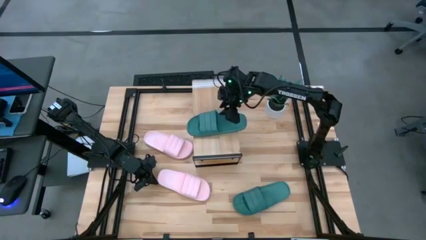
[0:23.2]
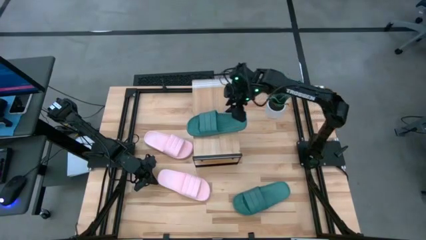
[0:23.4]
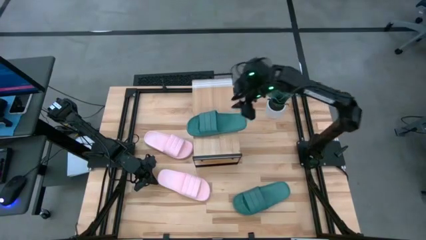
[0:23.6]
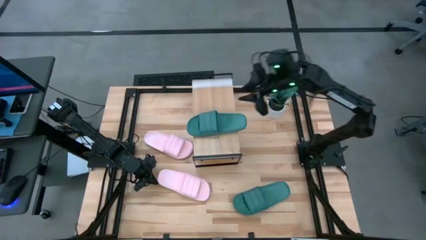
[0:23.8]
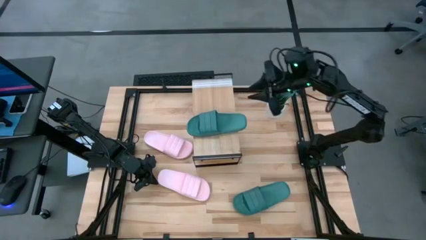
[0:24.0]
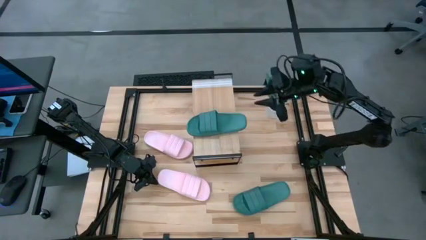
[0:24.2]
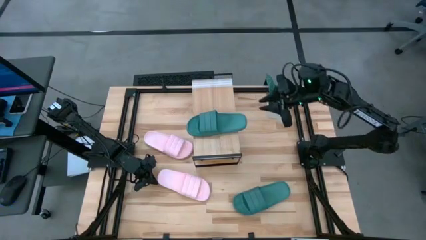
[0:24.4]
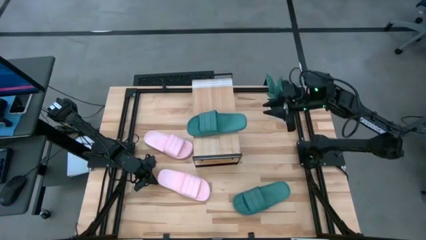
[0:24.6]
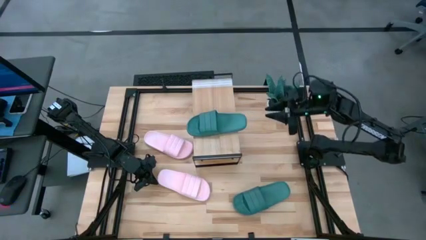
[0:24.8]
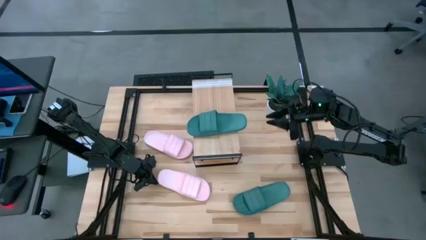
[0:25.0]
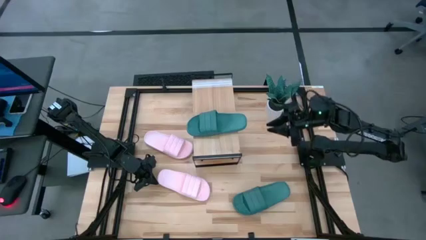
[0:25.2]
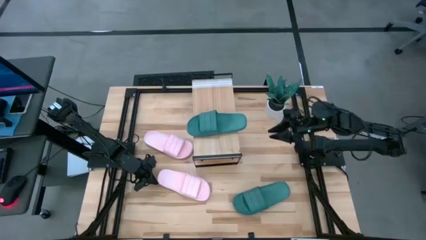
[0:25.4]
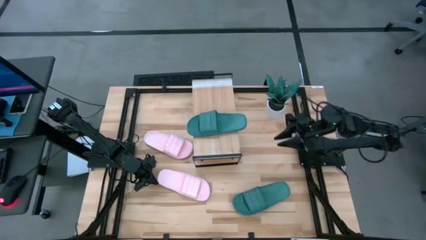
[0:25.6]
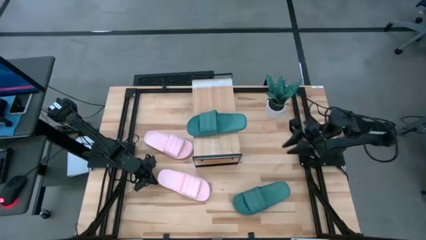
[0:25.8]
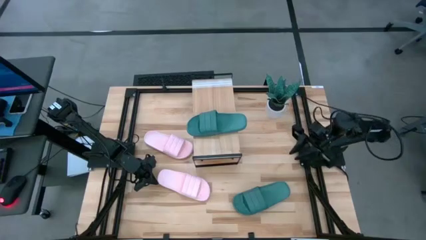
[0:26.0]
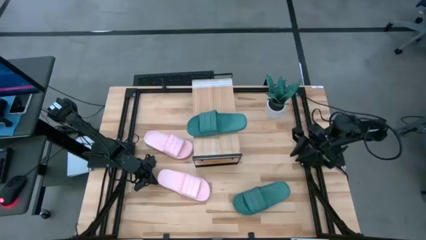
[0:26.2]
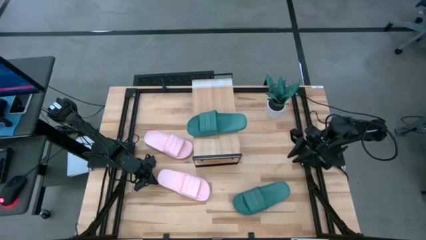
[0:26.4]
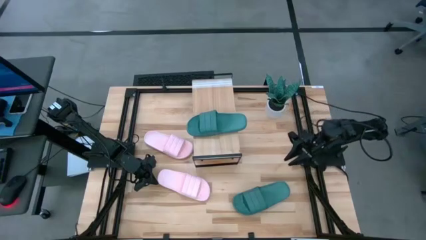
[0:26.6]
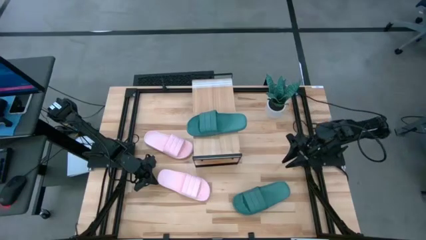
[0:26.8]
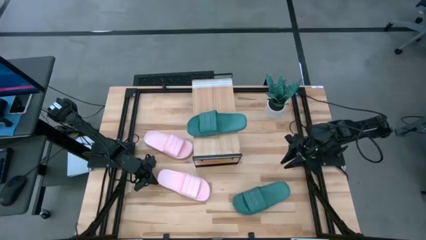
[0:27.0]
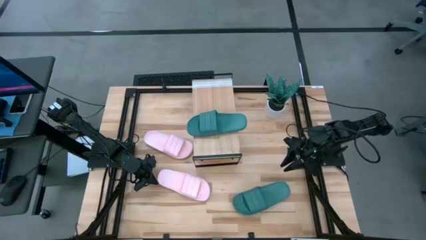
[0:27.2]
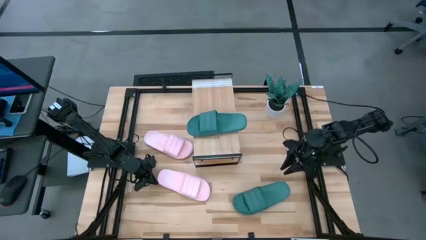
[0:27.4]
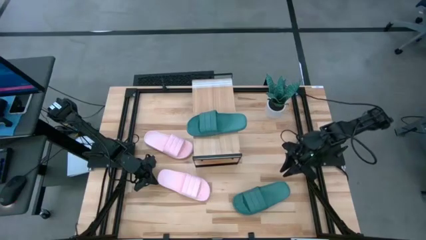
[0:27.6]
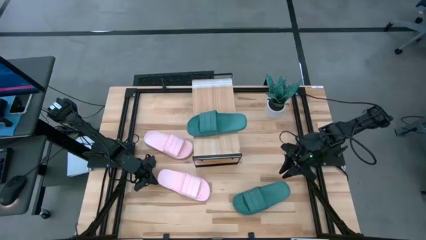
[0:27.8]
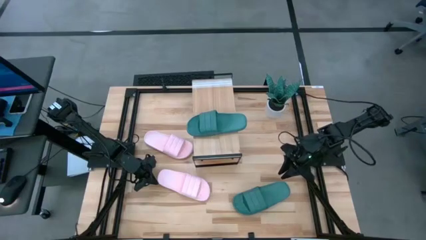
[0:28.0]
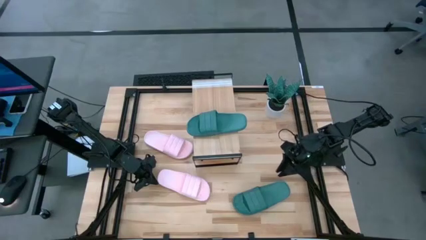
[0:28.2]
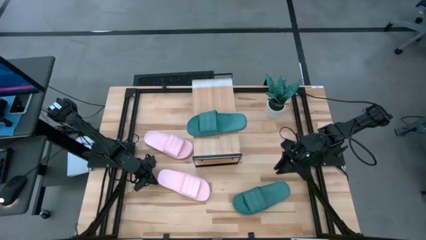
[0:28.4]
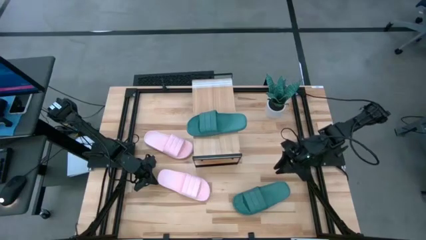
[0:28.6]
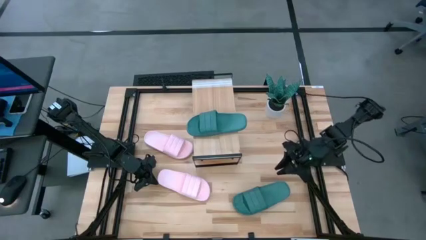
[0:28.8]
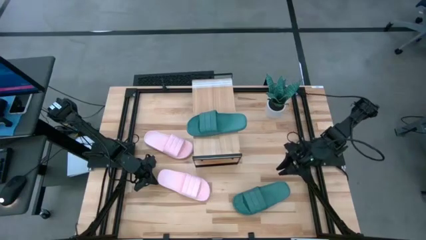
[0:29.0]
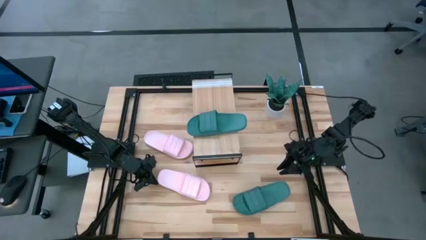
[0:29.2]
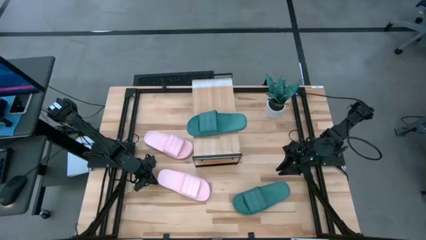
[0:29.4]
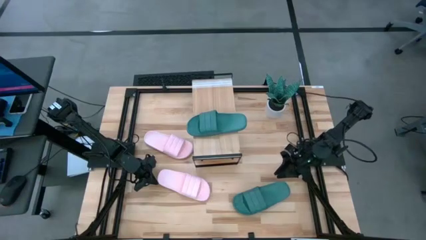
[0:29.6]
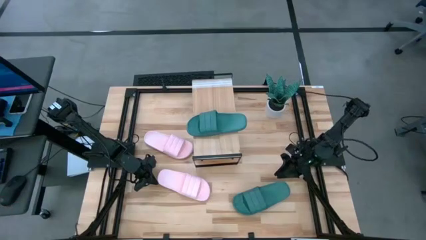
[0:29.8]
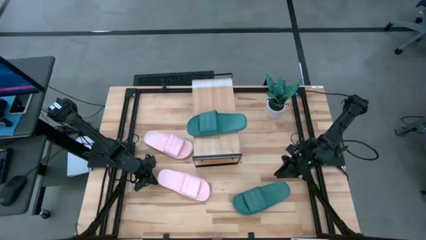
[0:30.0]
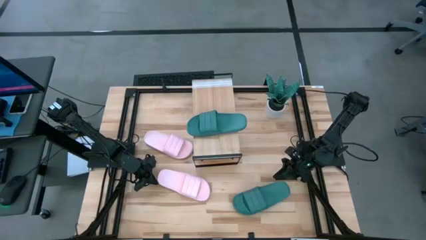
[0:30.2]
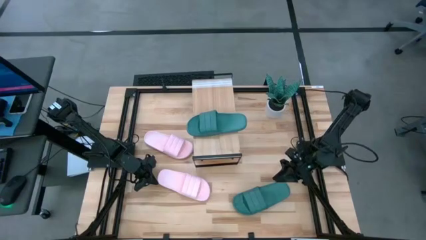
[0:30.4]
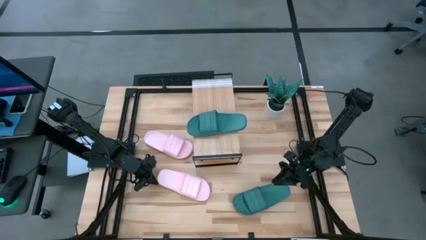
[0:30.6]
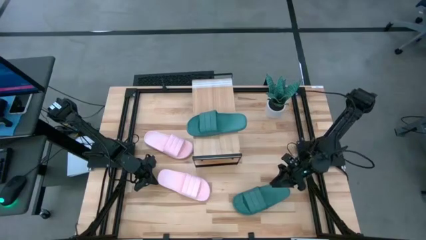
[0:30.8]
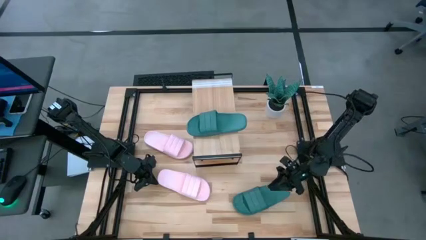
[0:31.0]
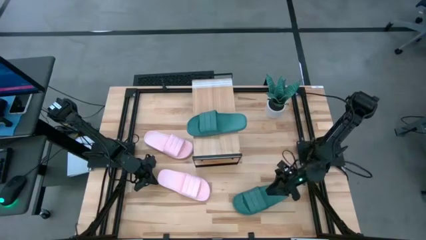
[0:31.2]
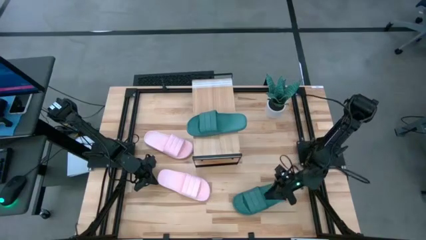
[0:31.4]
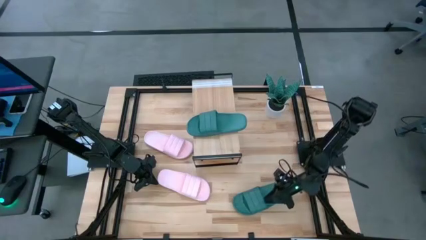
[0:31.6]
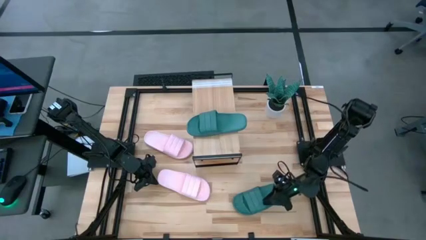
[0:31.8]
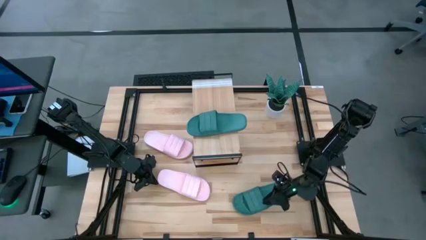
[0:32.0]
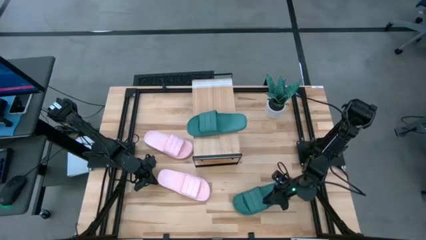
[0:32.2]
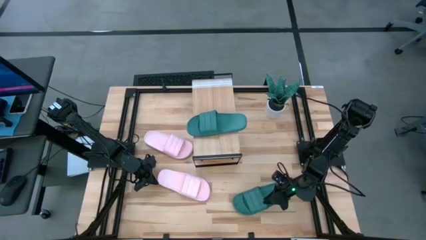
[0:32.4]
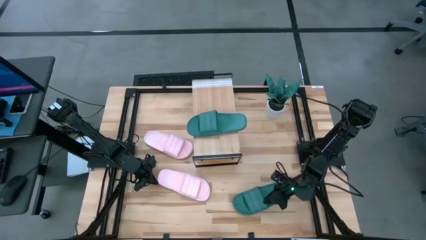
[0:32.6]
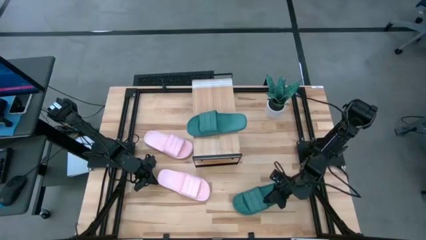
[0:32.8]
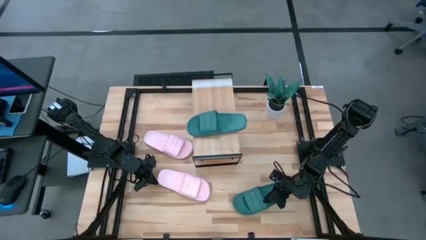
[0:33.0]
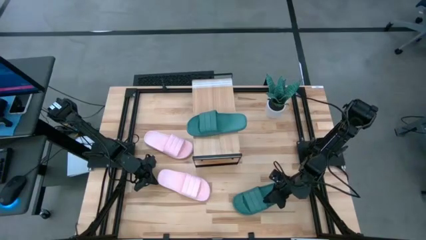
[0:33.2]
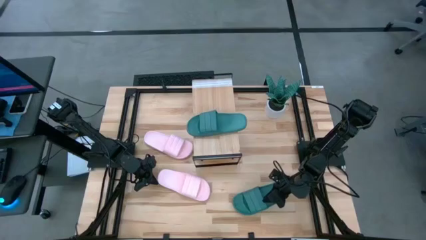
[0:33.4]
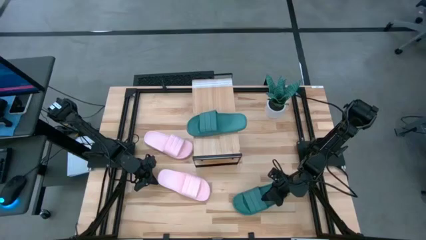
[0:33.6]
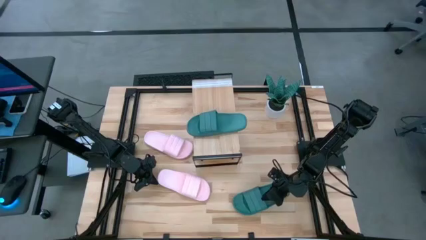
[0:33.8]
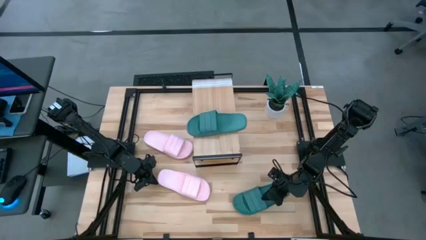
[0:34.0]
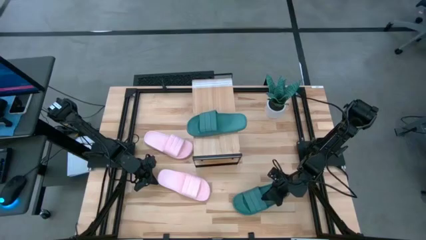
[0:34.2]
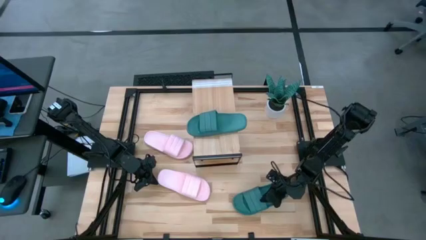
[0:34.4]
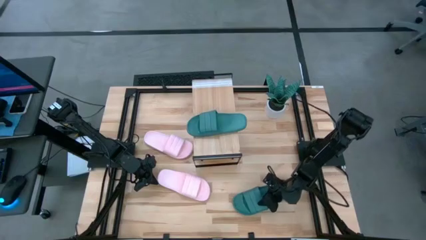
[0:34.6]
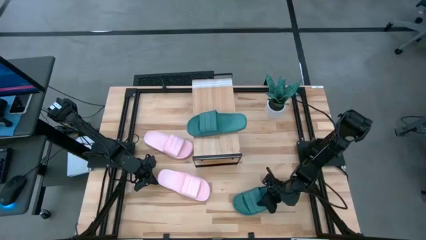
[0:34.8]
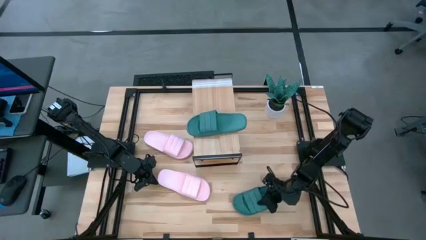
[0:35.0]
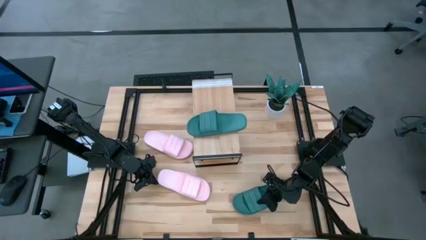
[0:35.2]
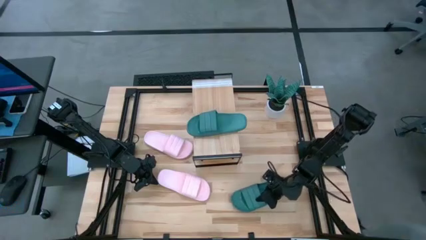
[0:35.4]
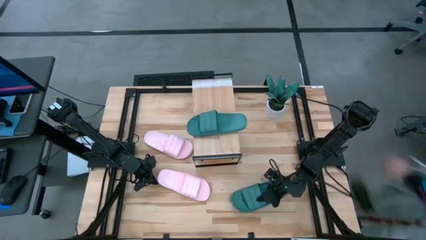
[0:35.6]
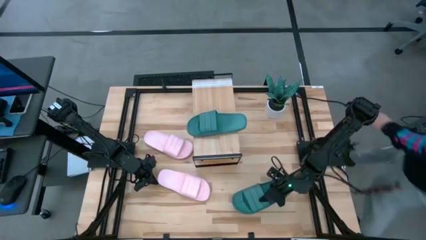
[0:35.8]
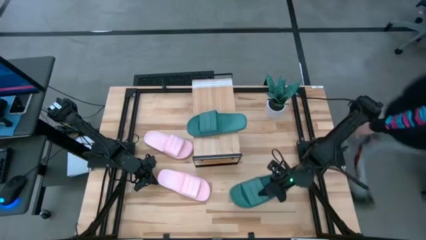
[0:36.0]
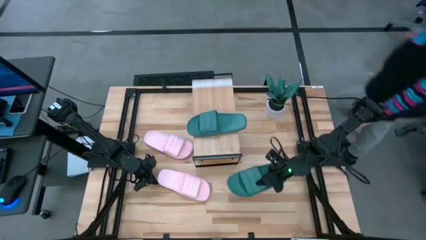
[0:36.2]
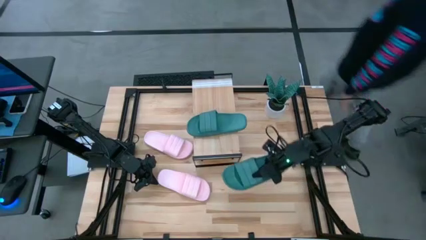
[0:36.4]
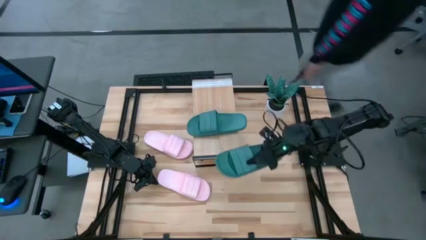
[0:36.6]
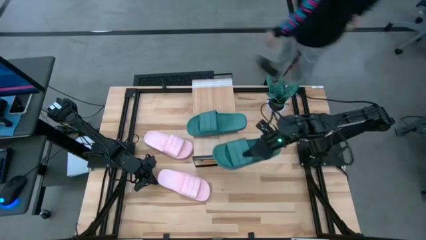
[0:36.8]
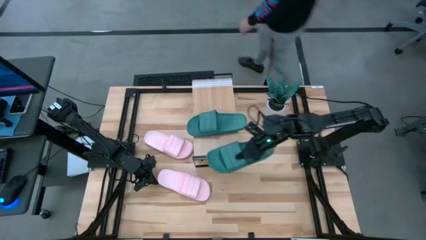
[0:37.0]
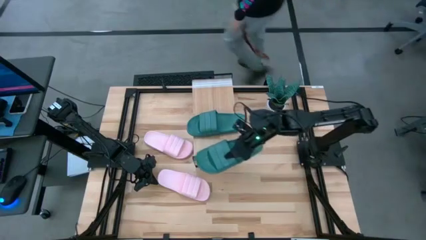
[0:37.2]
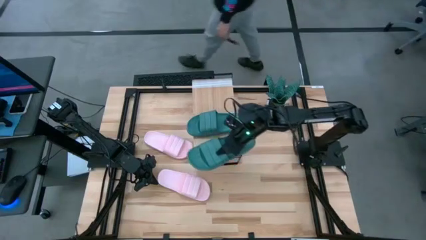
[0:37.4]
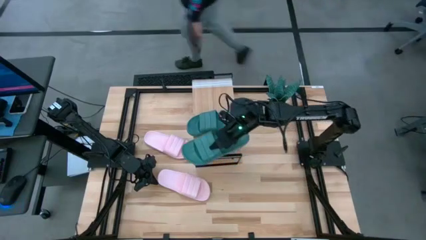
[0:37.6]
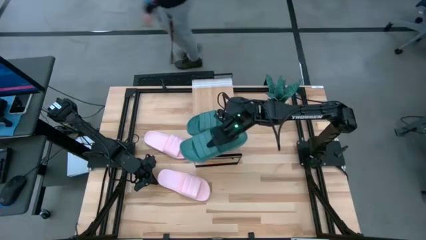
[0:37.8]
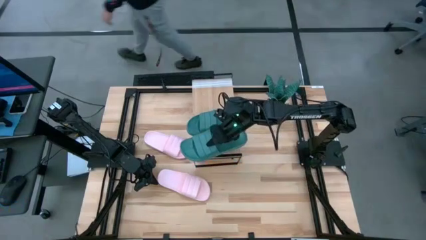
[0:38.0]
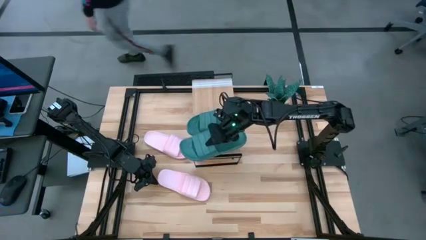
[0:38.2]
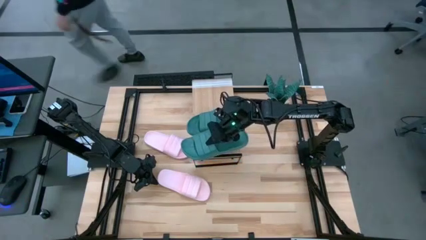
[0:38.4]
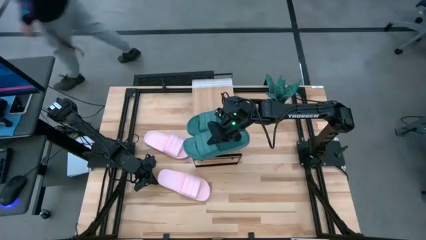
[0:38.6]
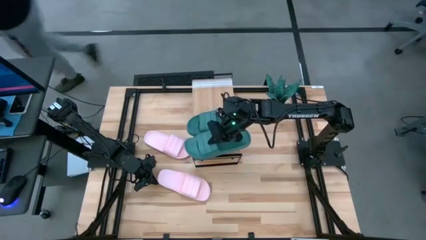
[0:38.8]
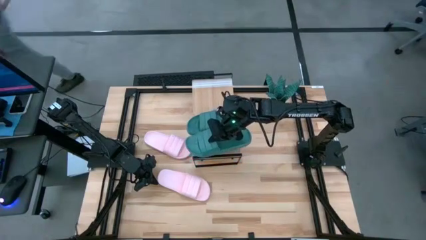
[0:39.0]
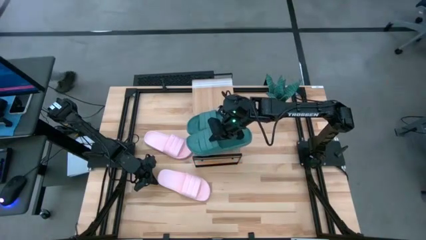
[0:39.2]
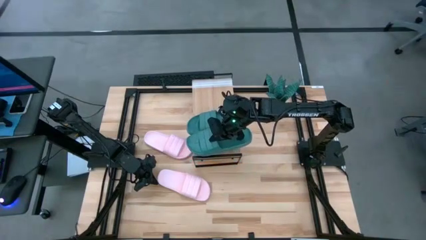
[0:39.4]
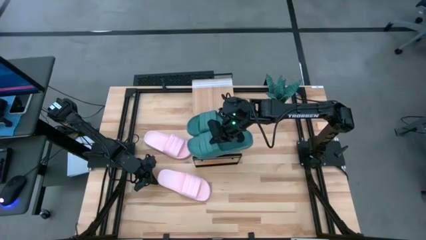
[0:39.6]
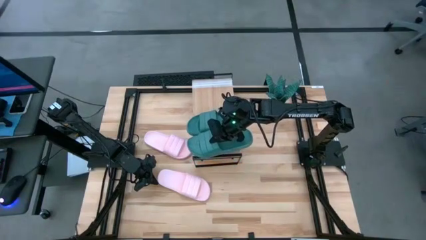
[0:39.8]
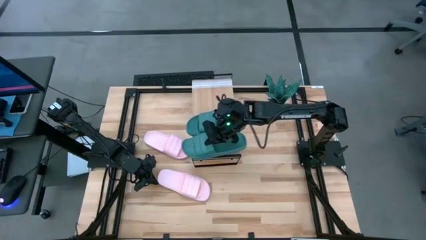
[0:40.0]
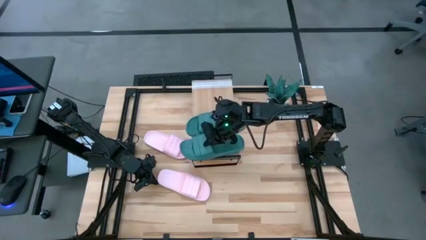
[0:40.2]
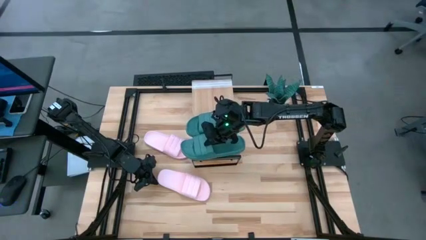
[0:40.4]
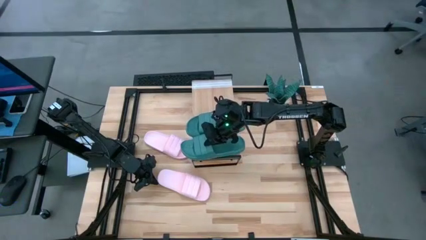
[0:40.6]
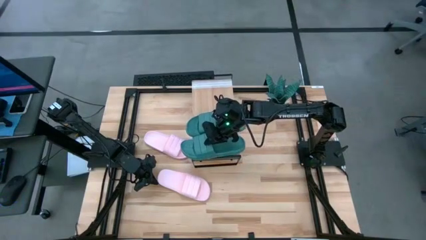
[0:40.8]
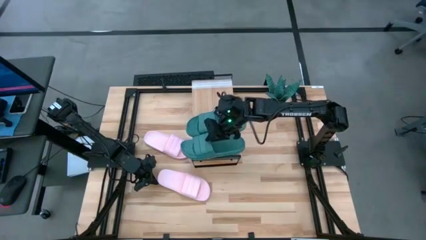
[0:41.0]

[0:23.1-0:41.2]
Task: Pick and place slides into the shelf
Put the green slide on the shelf
